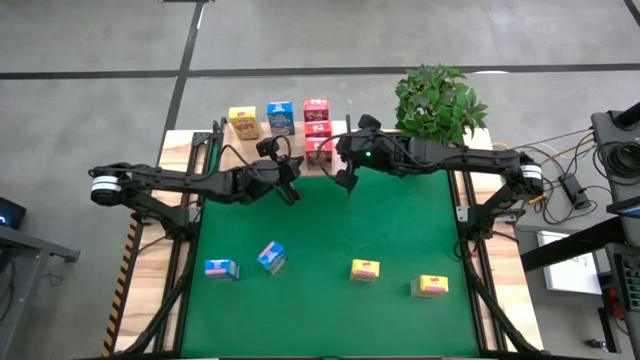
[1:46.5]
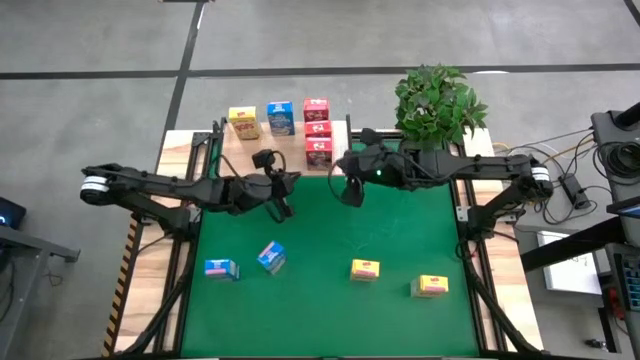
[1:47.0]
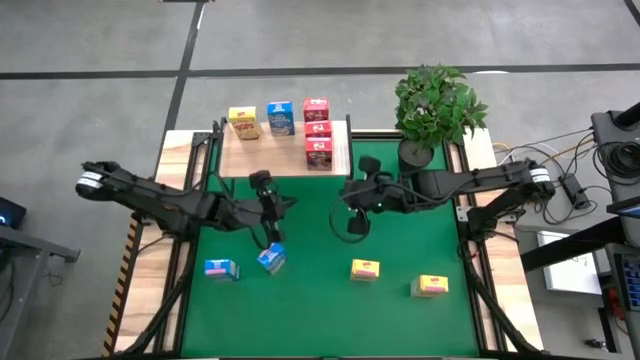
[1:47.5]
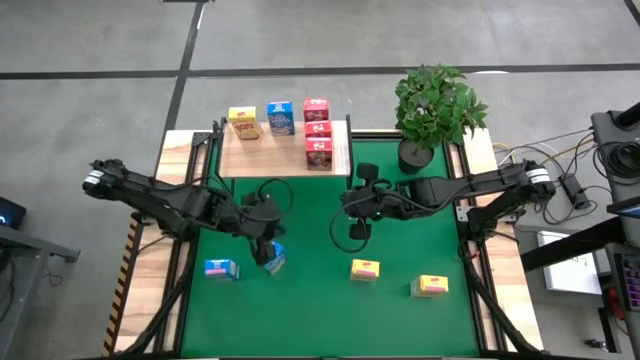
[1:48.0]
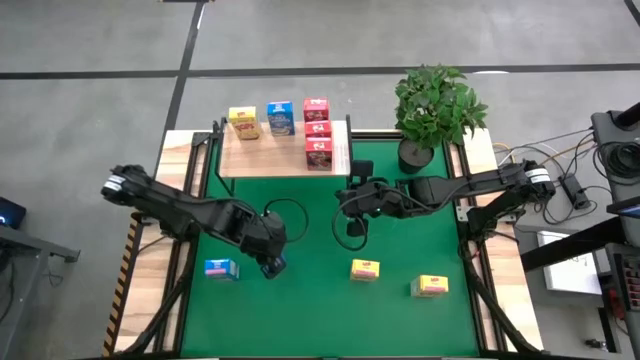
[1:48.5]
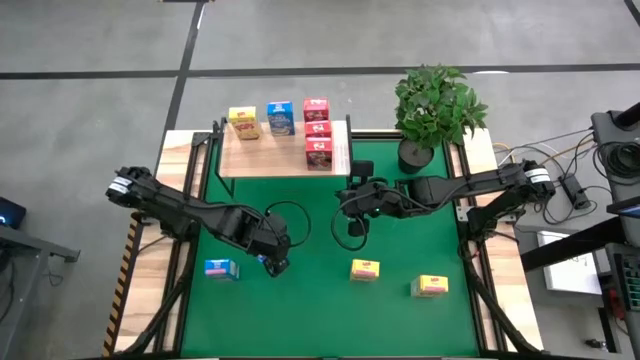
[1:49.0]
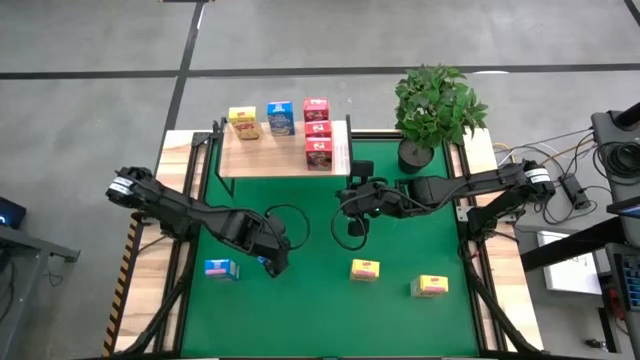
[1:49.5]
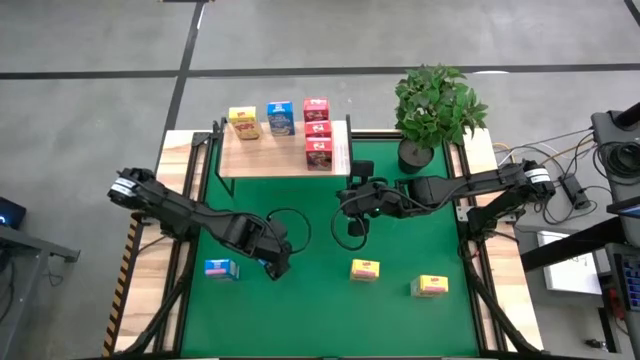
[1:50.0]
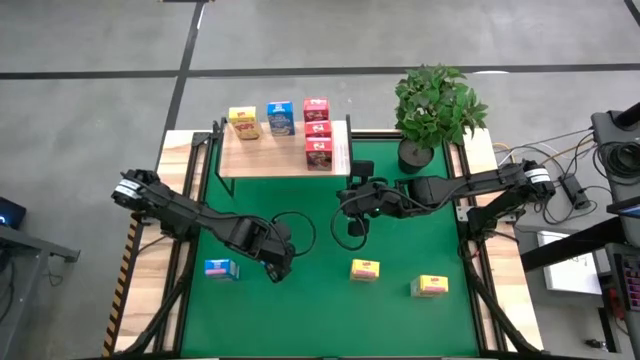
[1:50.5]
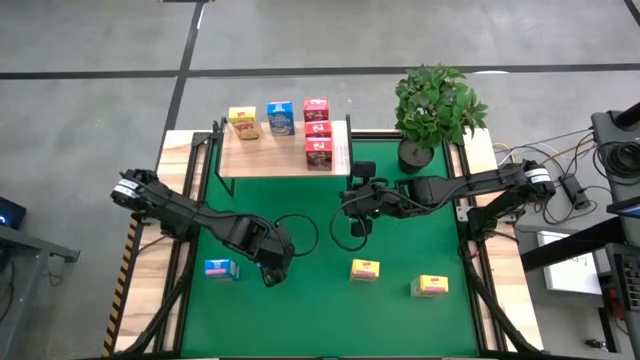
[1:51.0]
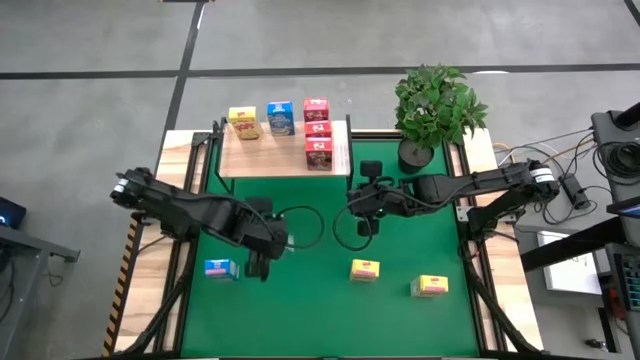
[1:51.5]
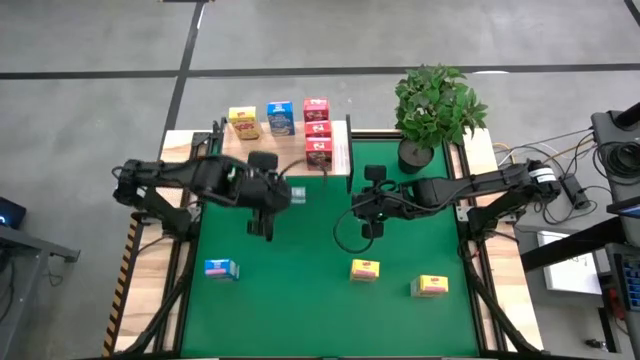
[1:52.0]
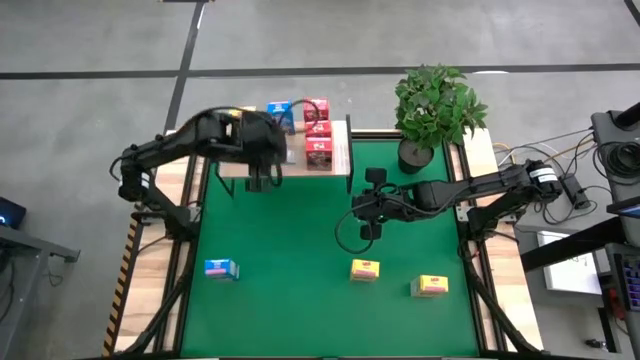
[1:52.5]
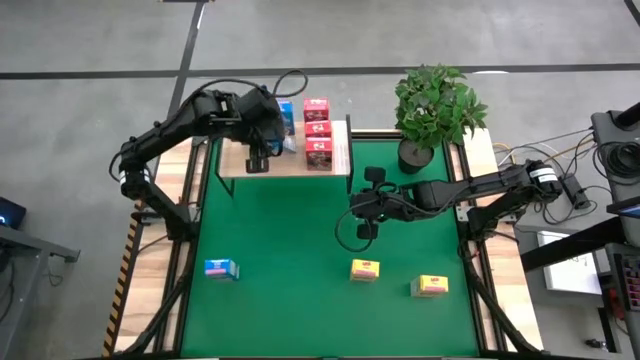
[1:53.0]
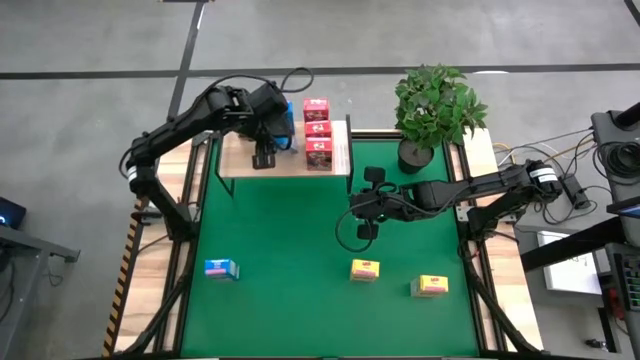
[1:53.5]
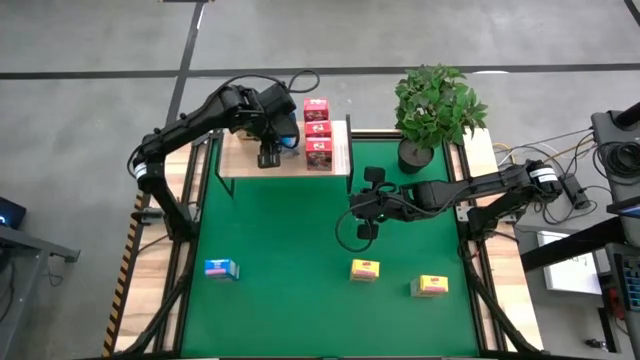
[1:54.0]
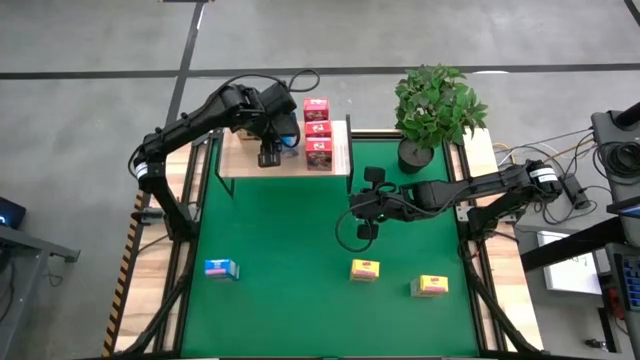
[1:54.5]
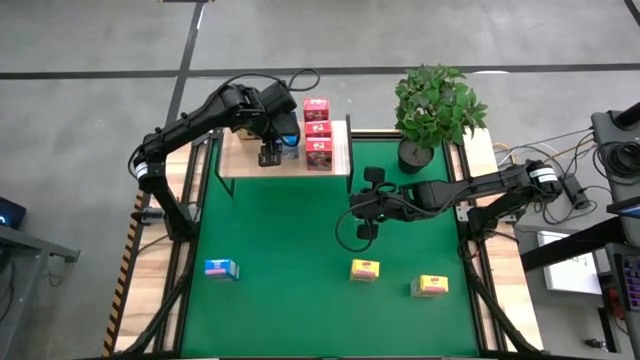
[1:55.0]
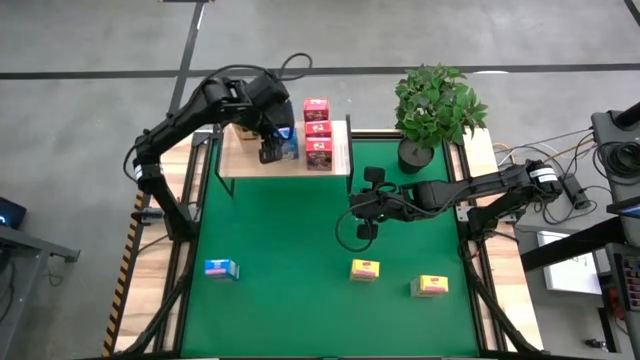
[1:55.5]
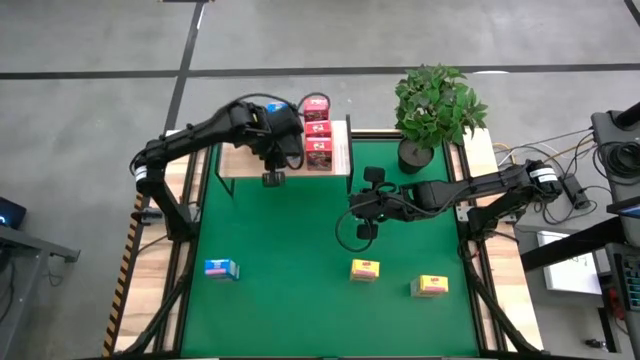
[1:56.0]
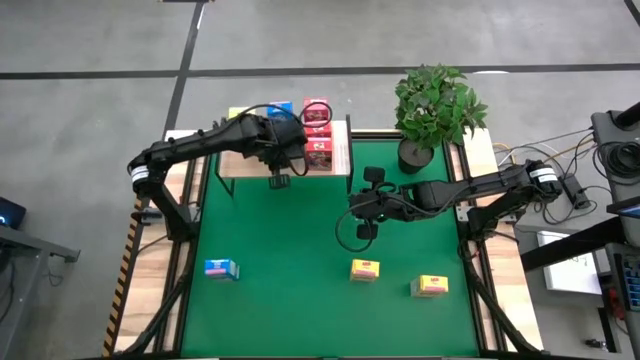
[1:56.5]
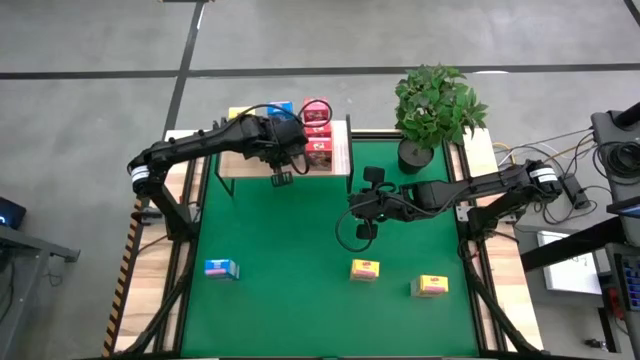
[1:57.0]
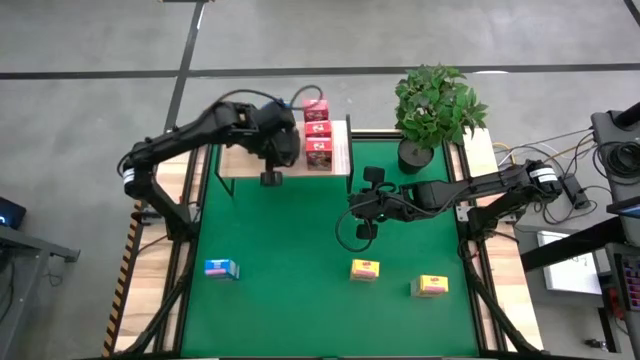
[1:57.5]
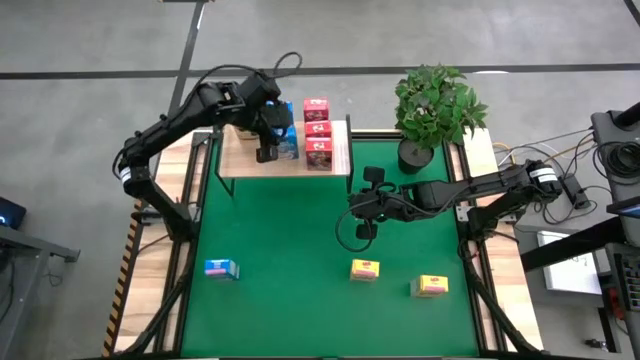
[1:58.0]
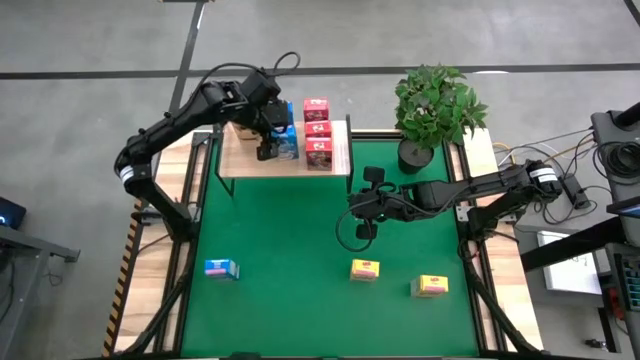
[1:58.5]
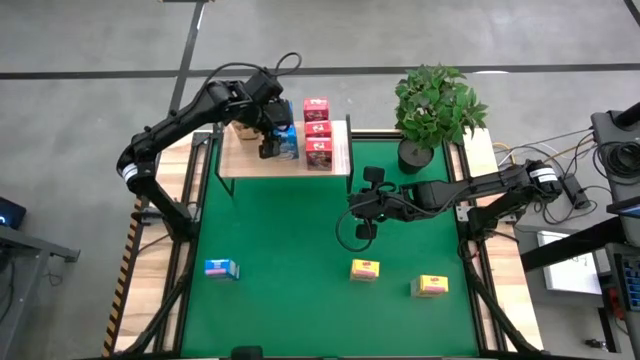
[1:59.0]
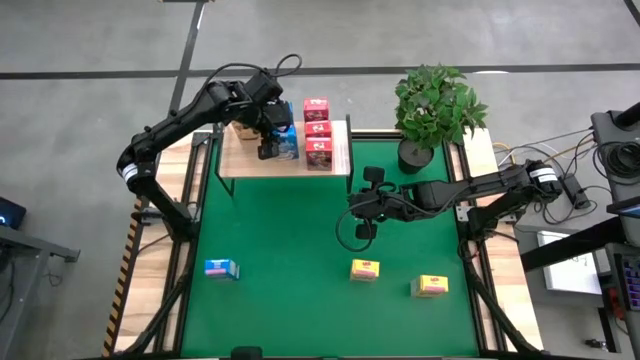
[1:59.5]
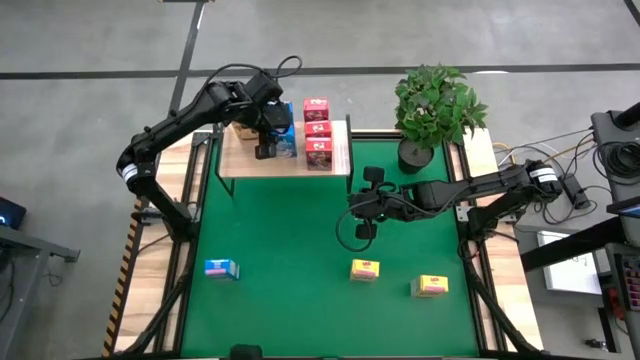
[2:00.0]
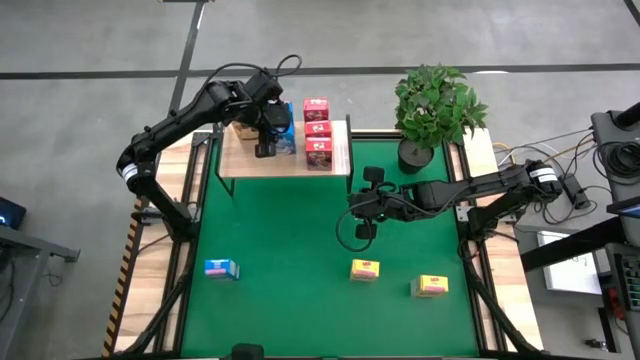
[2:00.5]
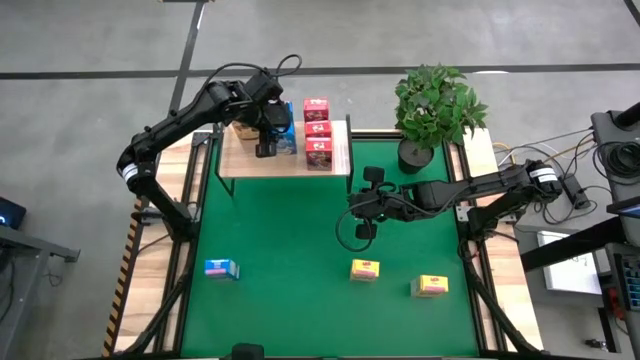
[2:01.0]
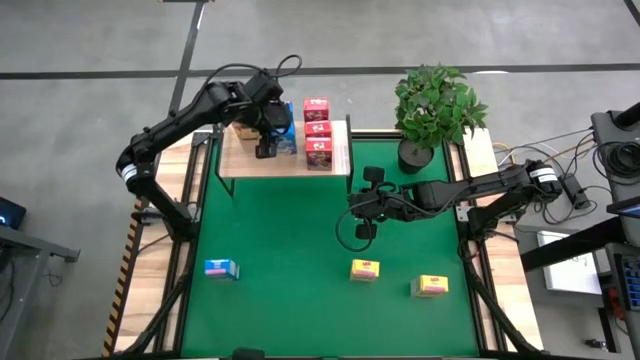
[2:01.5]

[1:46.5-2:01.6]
Task: Stack cereal on shelf
Put the center blue cereal on the shelf

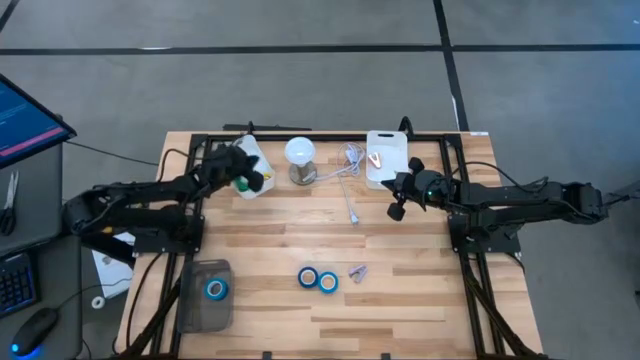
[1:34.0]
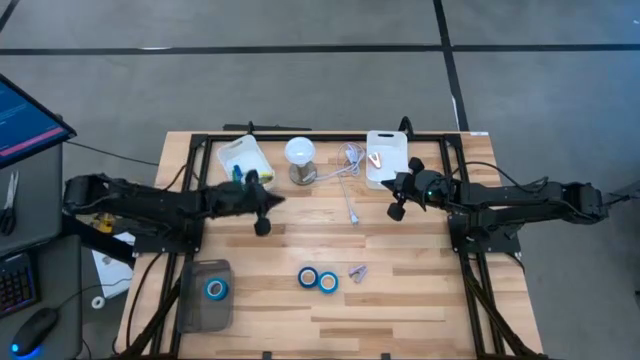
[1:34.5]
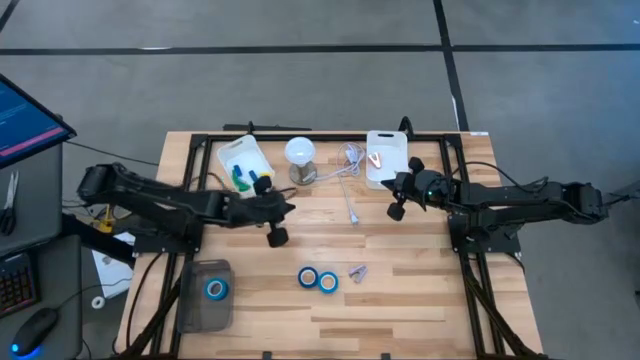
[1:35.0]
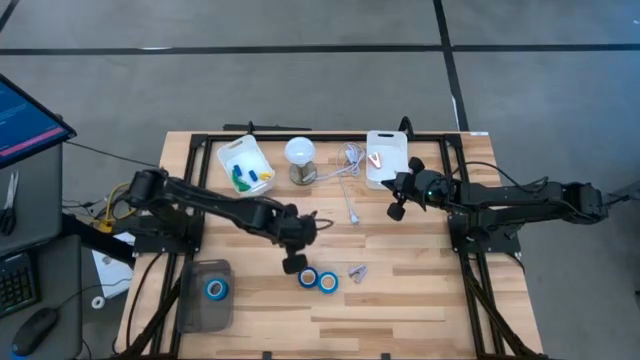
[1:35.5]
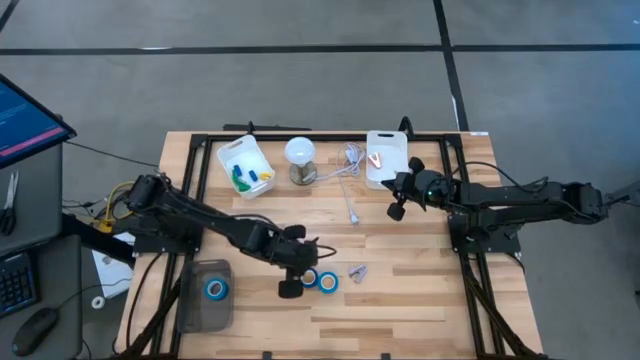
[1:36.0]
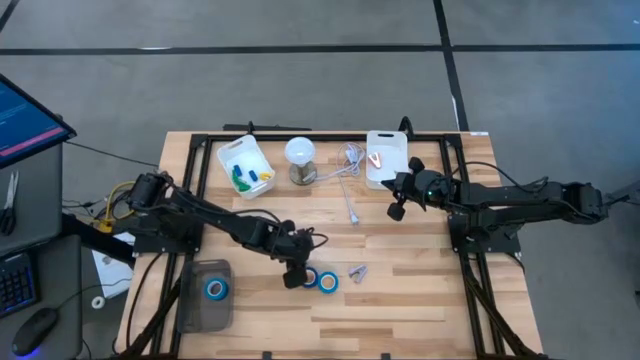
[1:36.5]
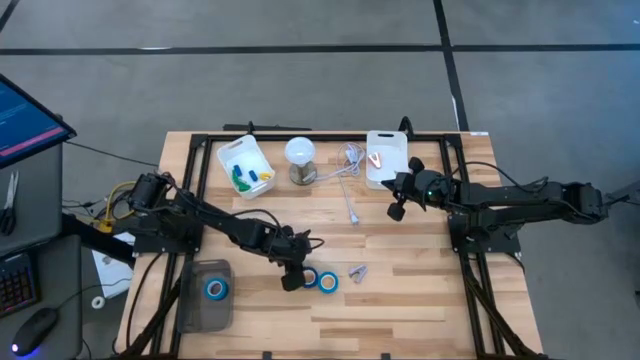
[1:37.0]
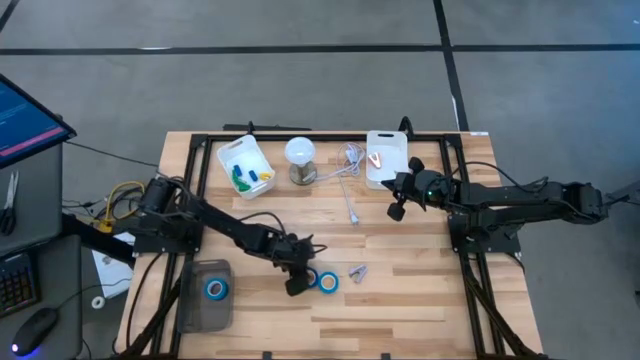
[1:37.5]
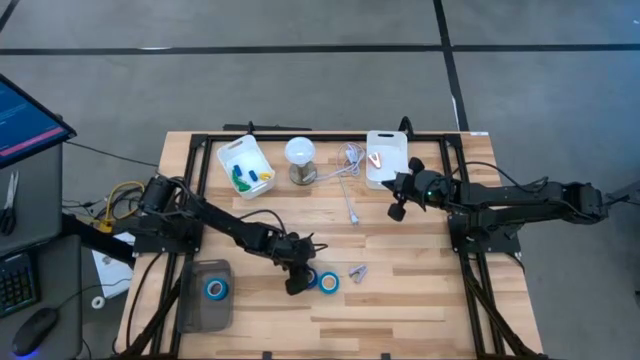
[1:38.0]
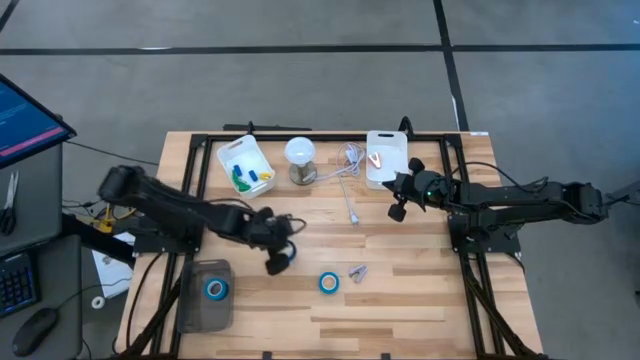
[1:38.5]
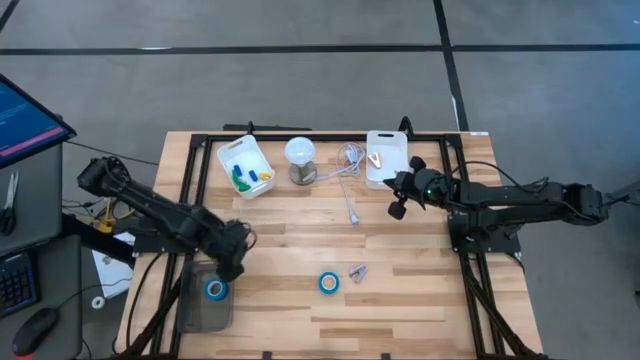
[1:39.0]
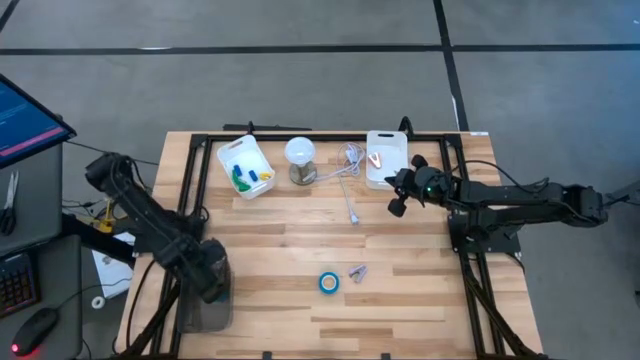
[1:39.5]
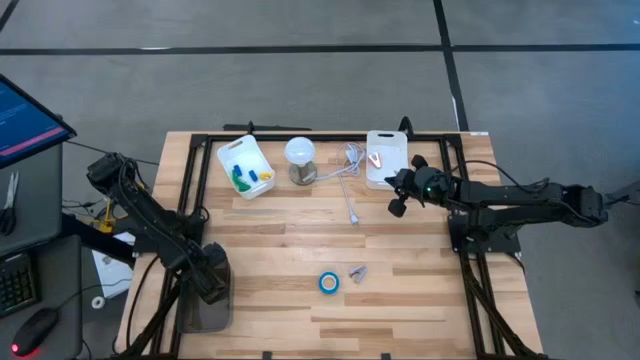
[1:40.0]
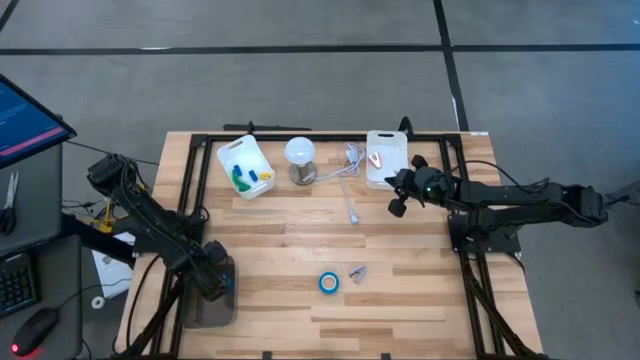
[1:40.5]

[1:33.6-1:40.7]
Task: Pick and place Stapler, Stapler remover, tape
Put the blue tape into the black bin
